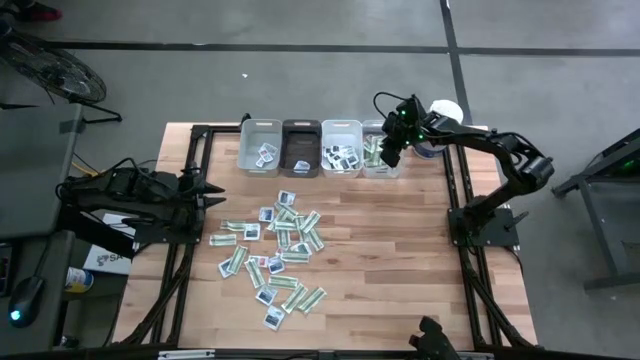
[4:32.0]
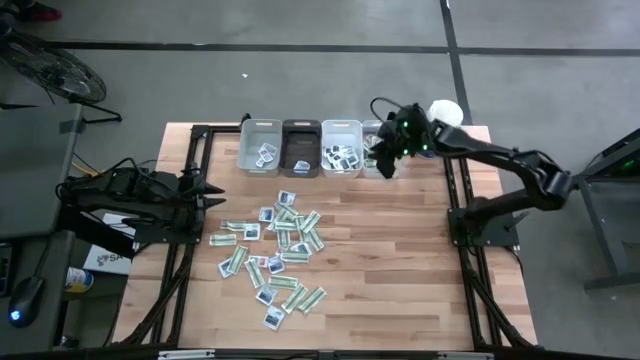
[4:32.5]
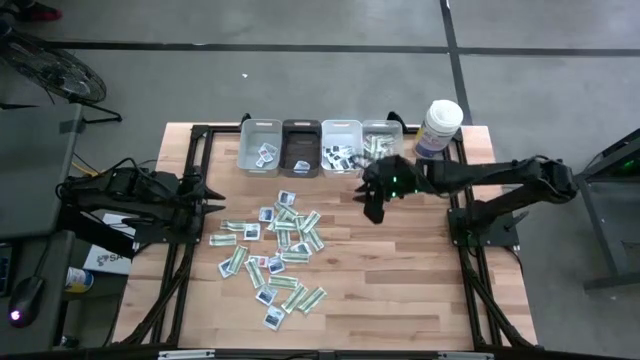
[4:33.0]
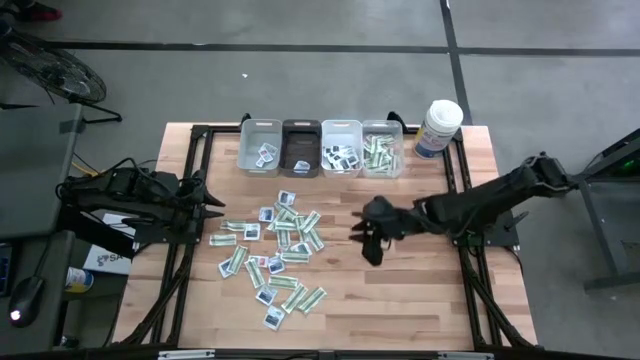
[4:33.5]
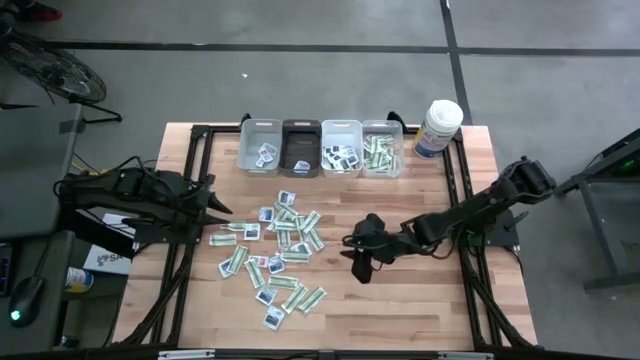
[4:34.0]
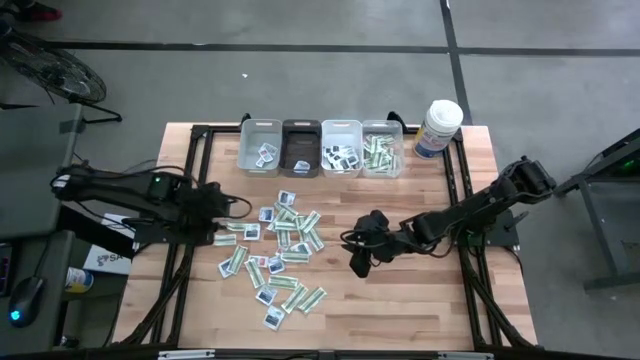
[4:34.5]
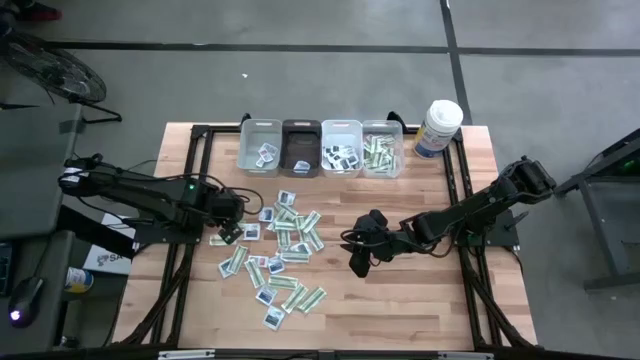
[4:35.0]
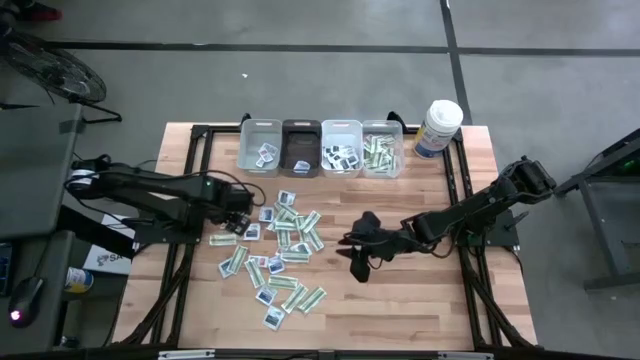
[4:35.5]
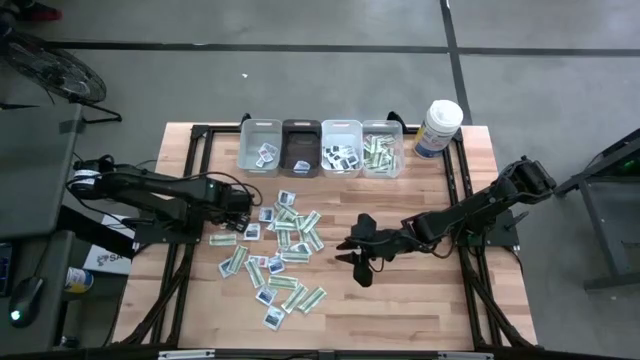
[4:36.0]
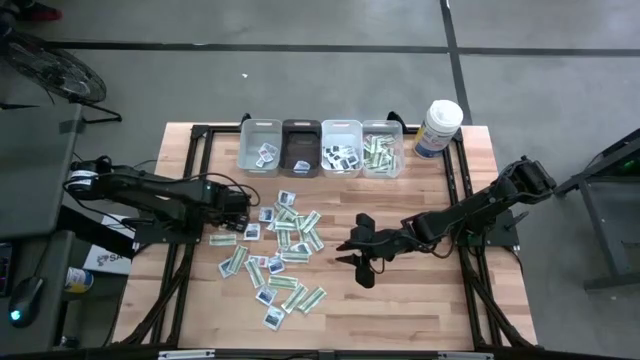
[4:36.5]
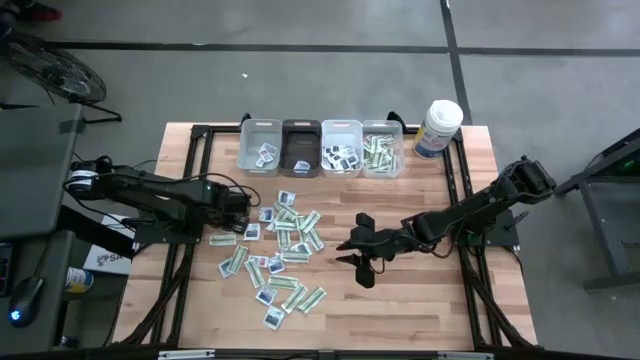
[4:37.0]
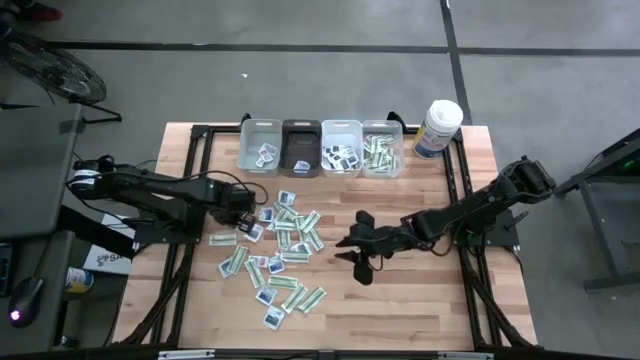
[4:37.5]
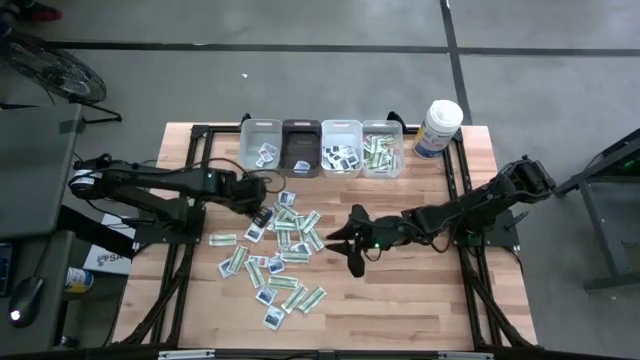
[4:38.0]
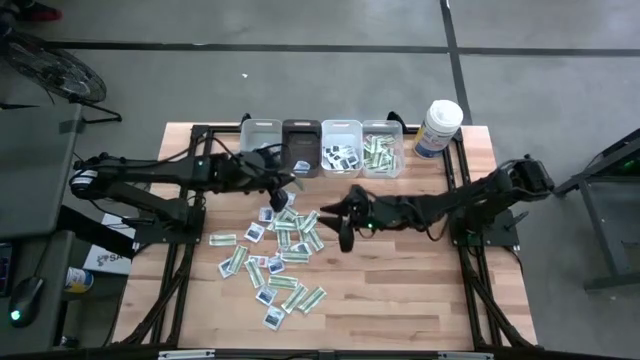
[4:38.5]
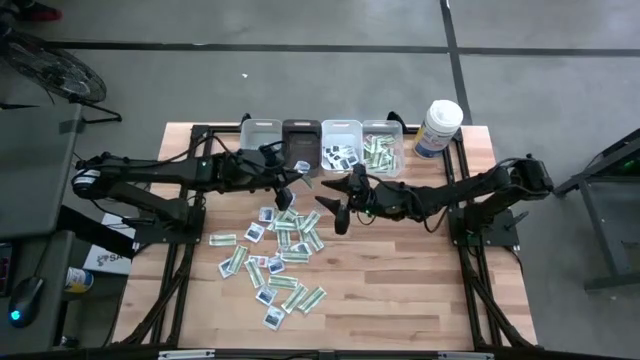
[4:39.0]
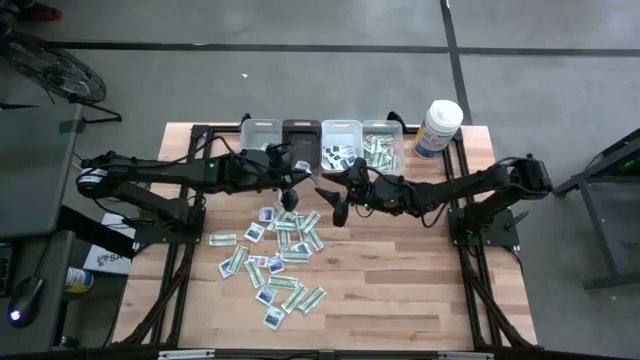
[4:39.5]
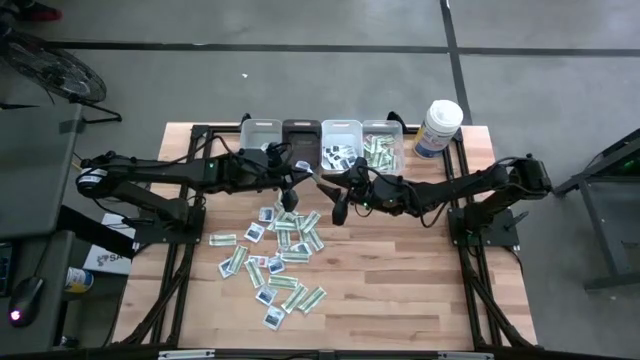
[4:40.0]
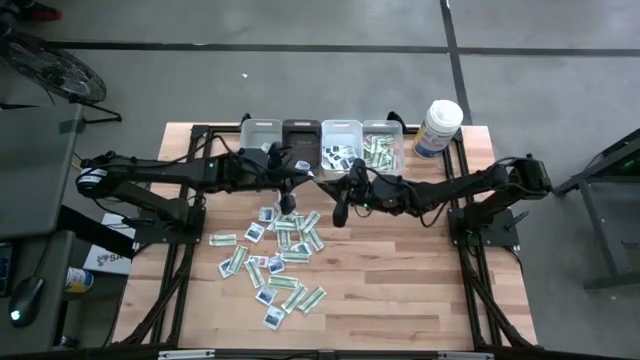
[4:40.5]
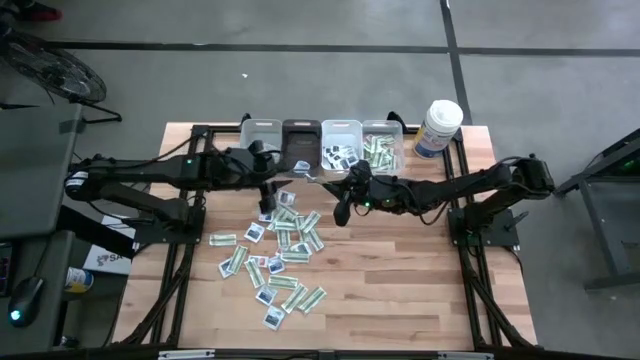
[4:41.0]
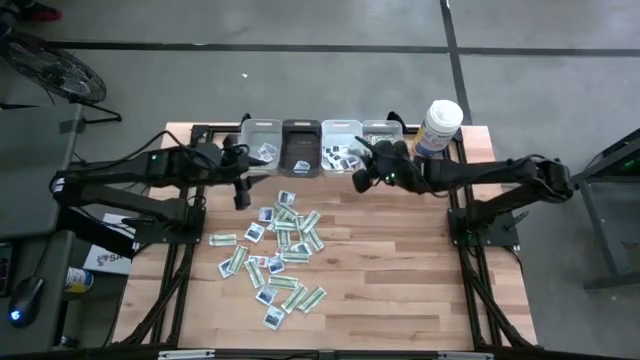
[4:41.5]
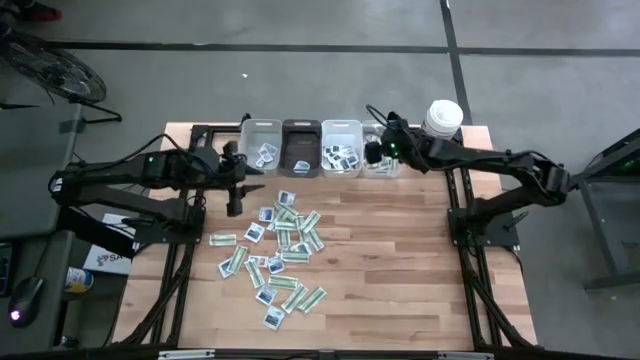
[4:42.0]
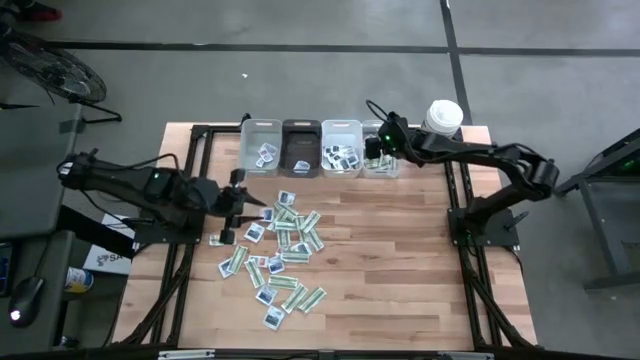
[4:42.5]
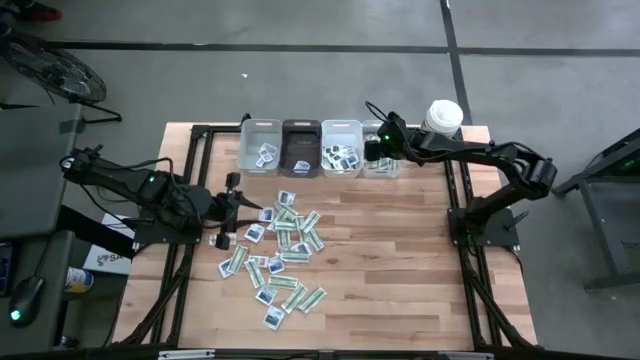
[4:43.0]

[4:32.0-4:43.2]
Task: Pick & Place First Aid Supplies
Put the green bandage into the transparent bin

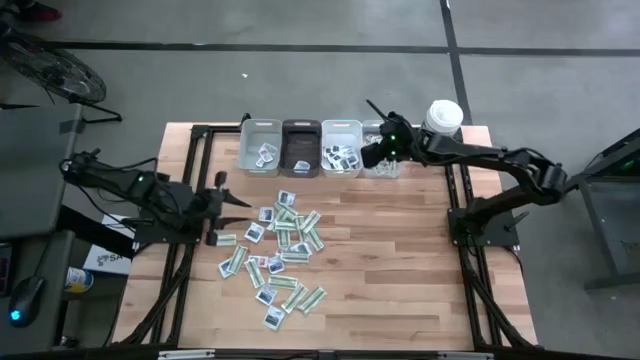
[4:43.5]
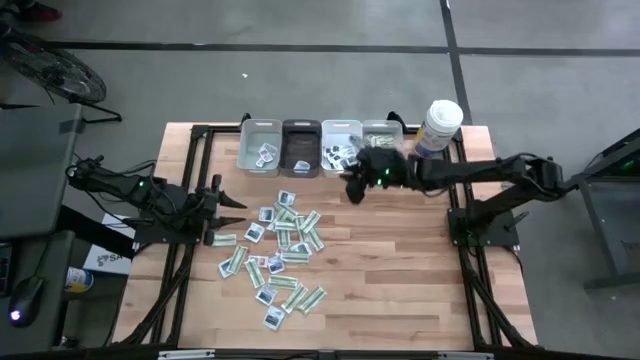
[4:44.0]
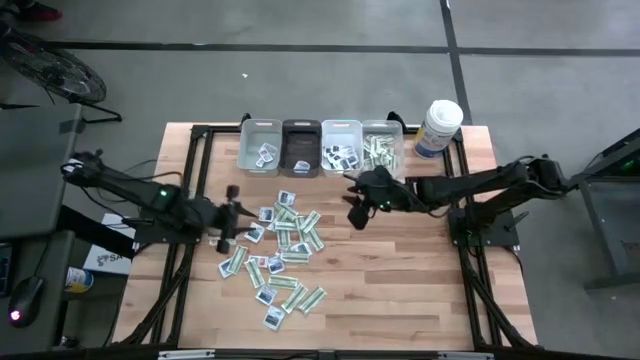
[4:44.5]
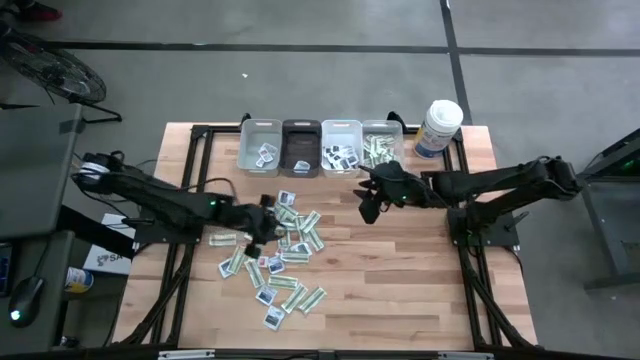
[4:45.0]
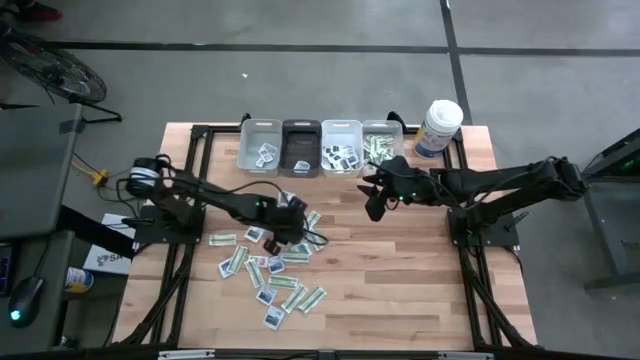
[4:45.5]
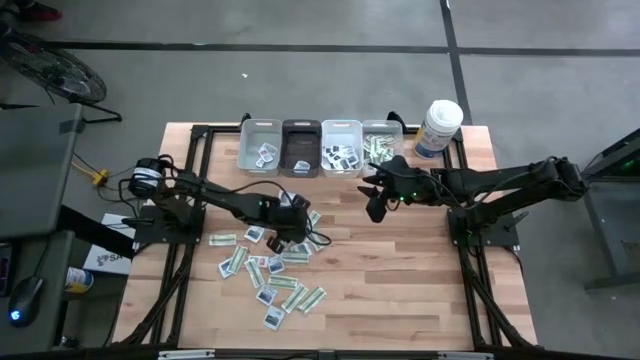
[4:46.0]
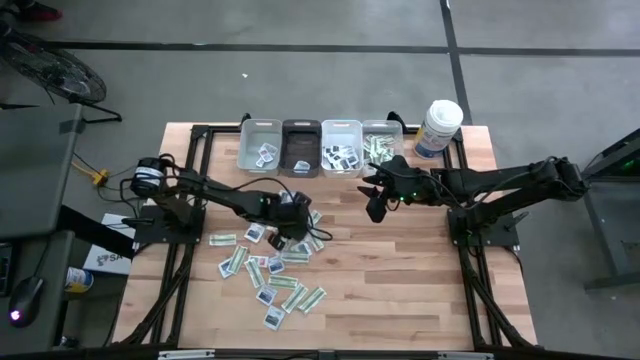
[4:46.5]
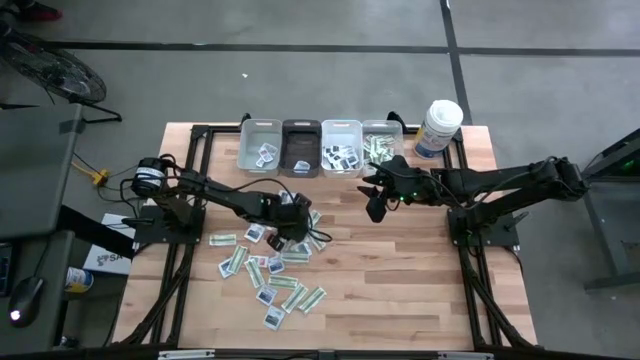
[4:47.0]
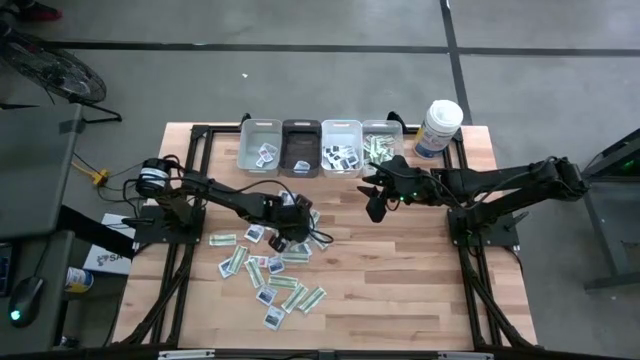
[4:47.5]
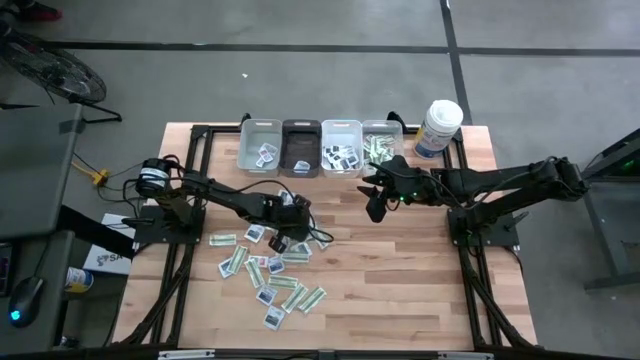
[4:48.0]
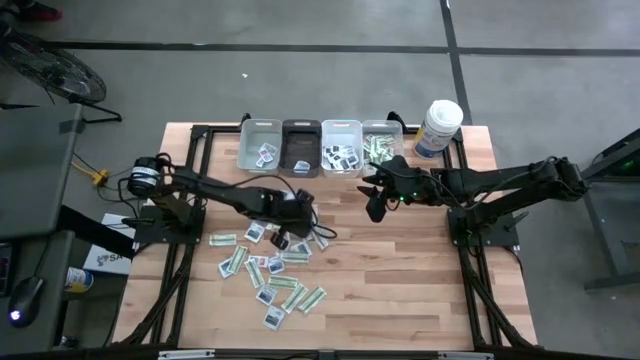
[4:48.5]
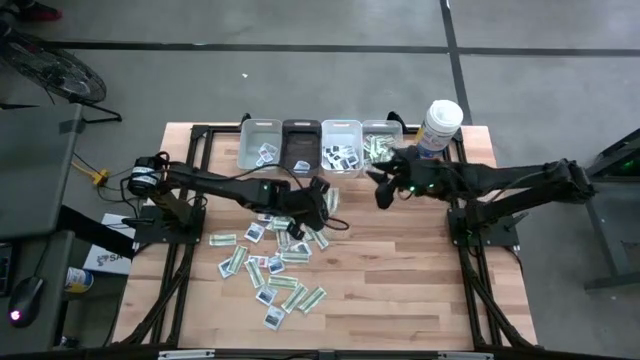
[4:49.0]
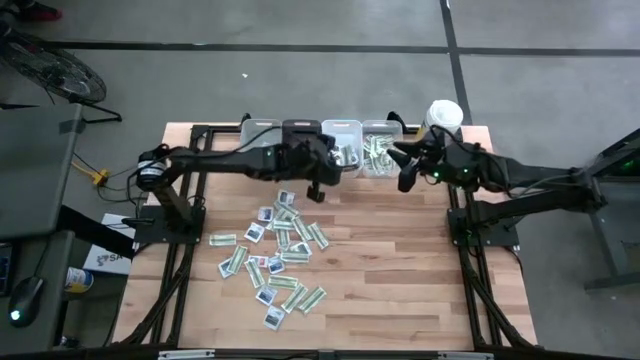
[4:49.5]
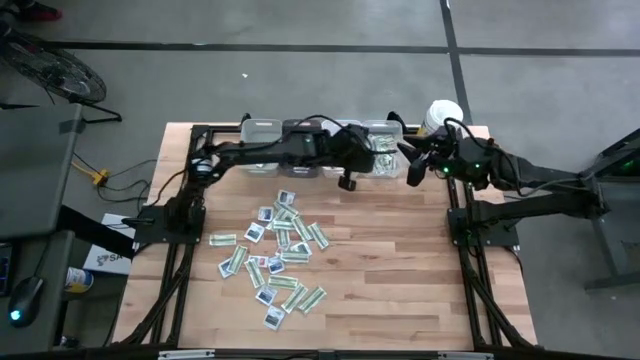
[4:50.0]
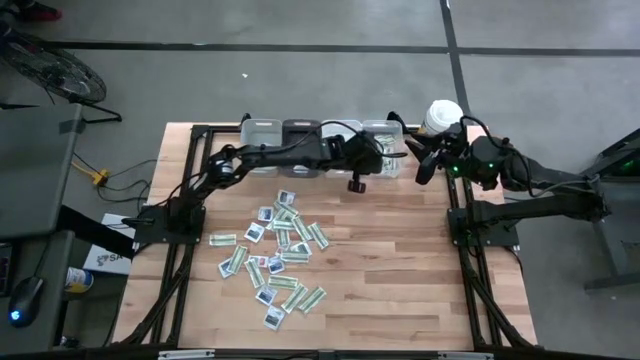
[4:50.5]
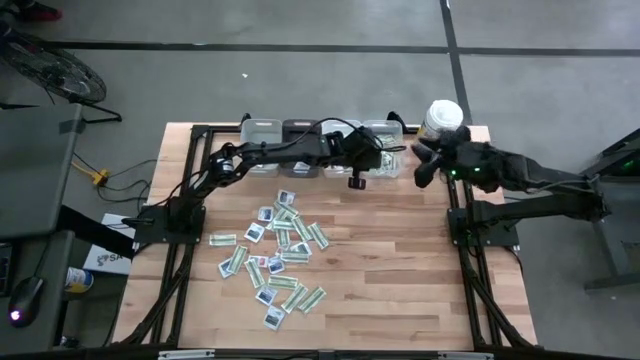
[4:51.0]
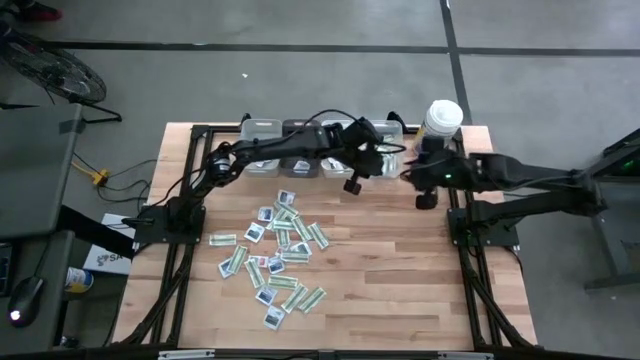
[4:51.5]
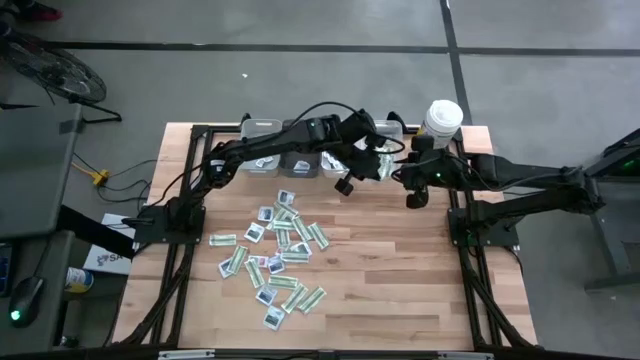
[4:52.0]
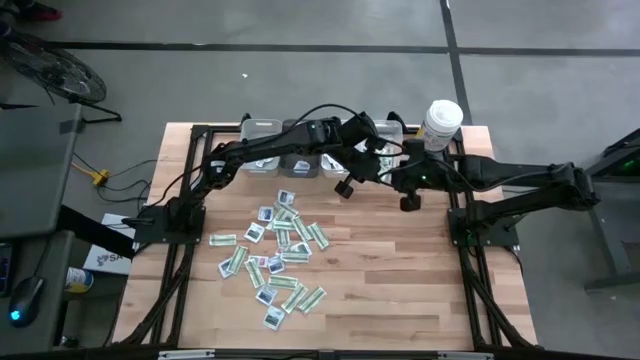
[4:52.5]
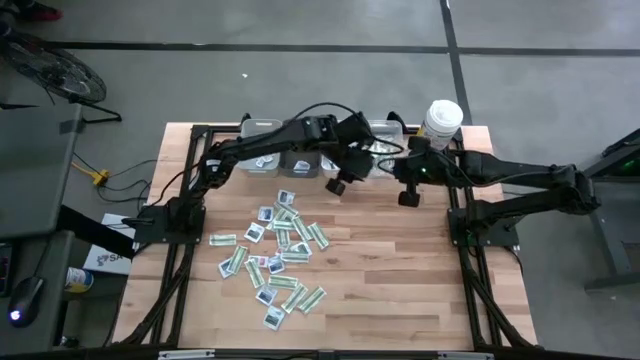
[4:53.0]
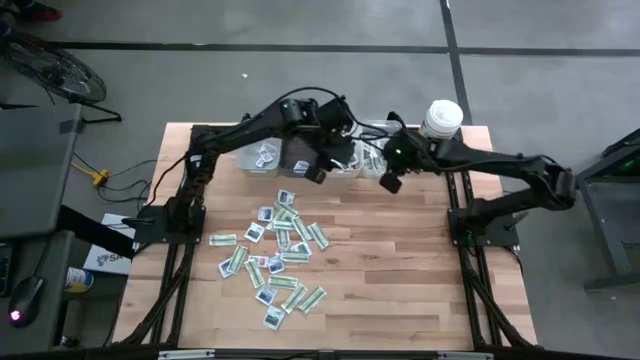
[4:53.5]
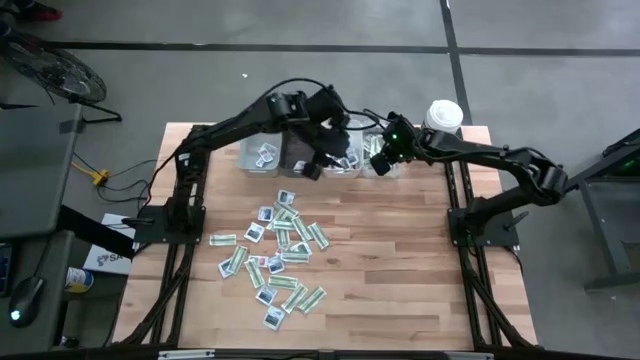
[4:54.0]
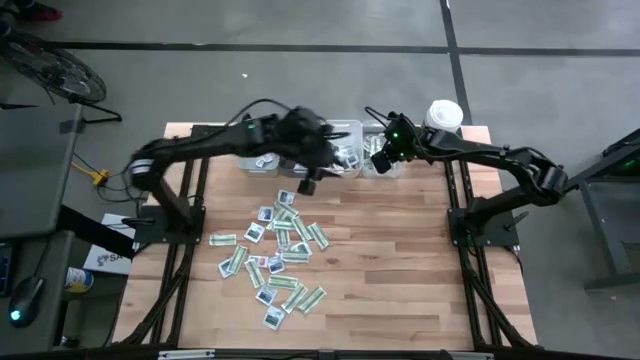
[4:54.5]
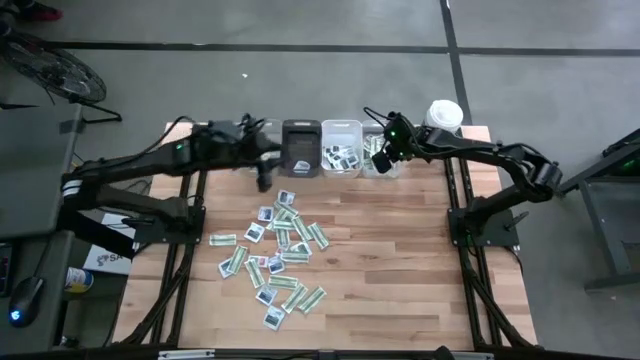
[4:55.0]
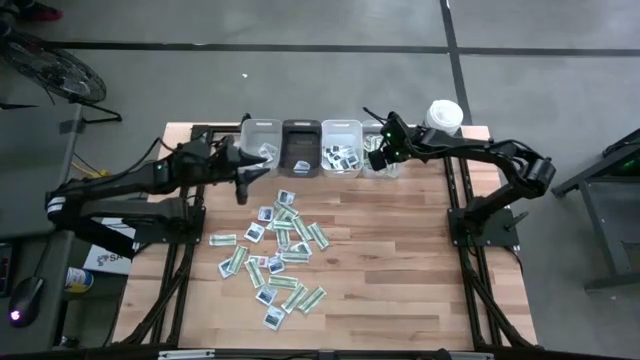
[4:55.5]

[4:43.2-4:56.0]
Put the green bandage into the transparent bin
